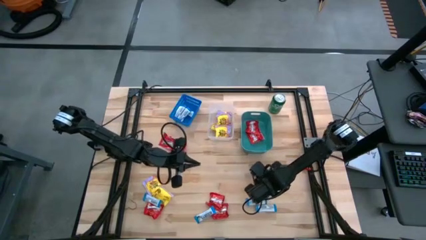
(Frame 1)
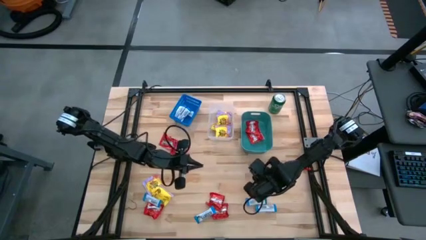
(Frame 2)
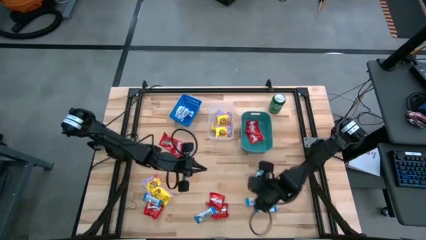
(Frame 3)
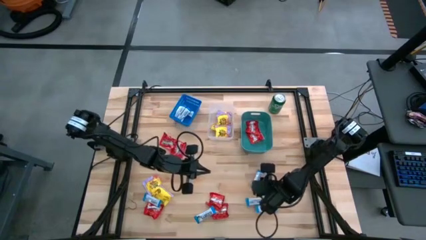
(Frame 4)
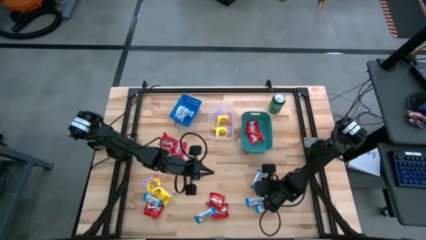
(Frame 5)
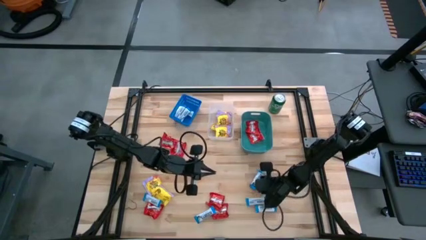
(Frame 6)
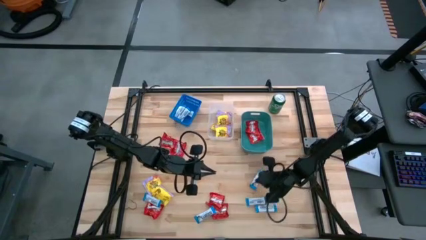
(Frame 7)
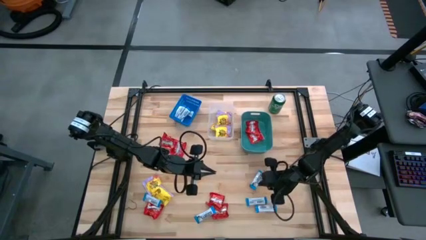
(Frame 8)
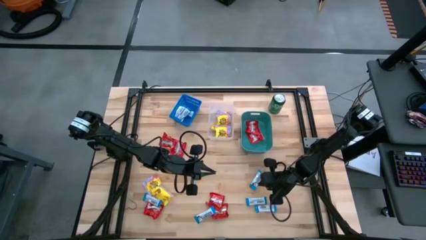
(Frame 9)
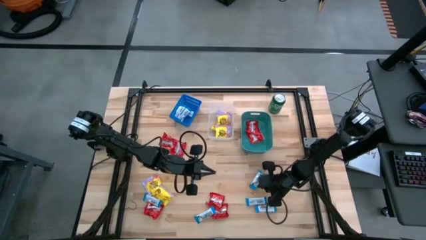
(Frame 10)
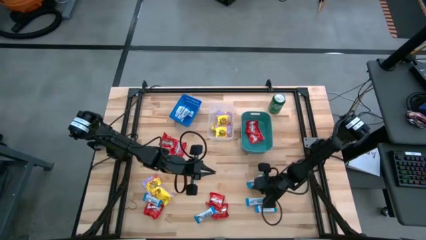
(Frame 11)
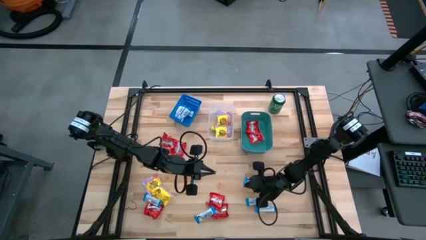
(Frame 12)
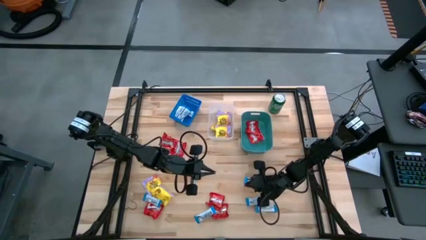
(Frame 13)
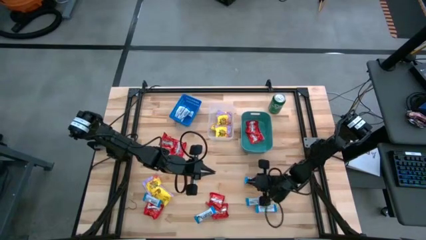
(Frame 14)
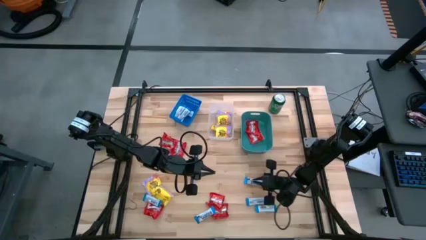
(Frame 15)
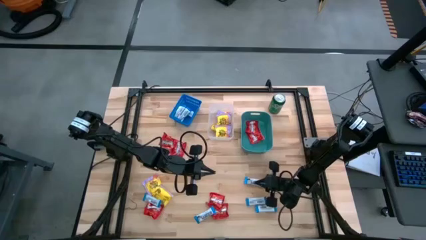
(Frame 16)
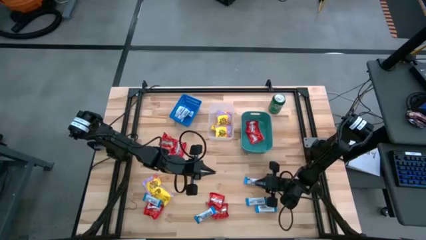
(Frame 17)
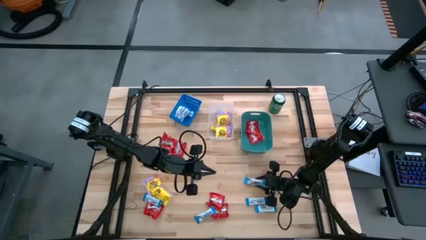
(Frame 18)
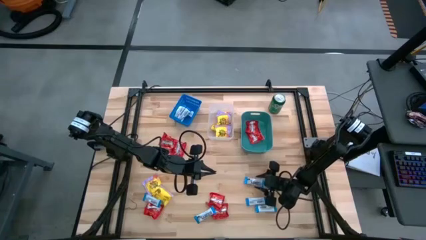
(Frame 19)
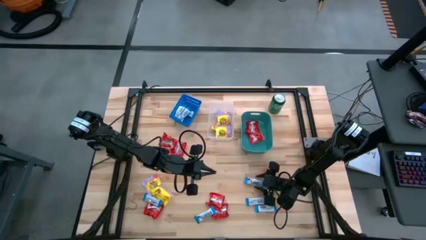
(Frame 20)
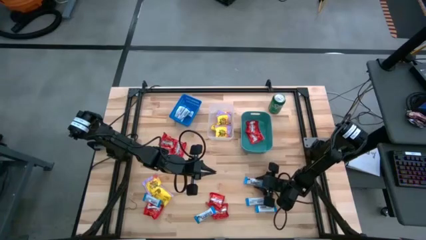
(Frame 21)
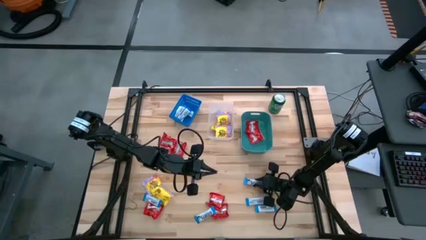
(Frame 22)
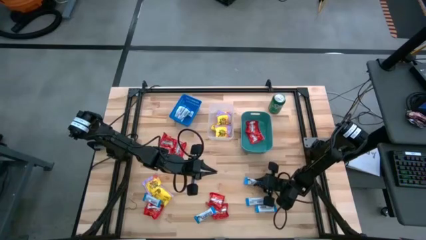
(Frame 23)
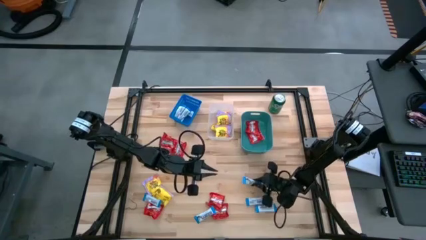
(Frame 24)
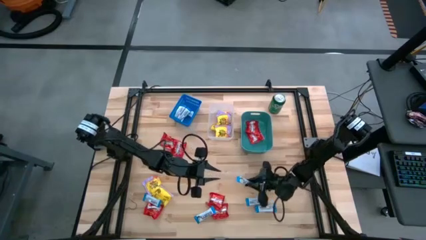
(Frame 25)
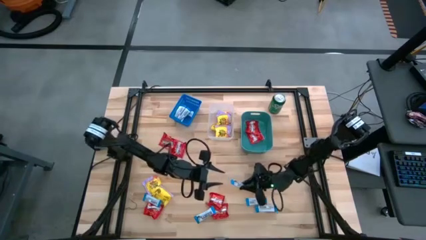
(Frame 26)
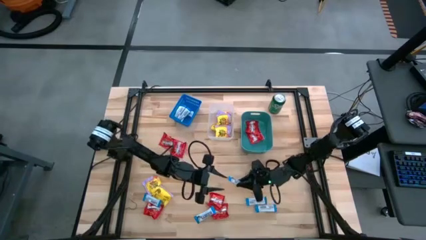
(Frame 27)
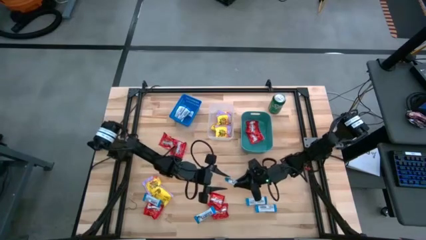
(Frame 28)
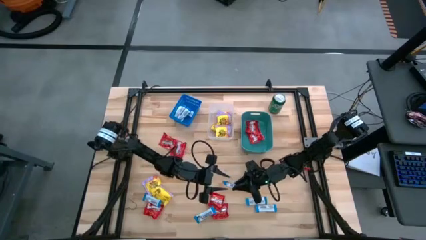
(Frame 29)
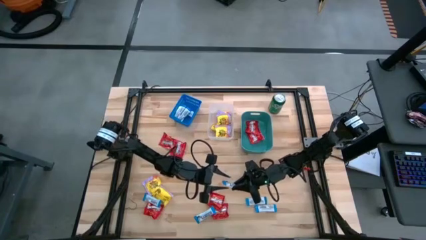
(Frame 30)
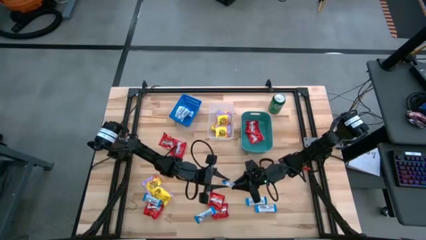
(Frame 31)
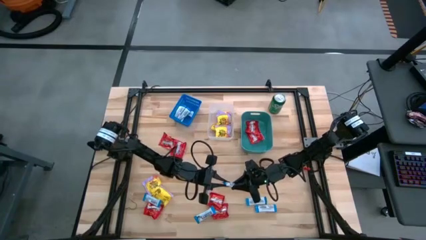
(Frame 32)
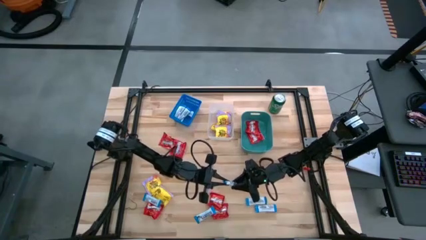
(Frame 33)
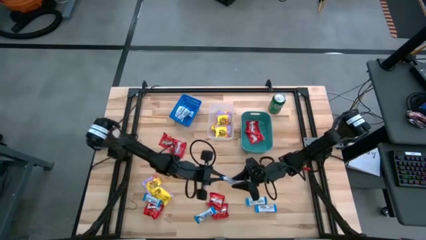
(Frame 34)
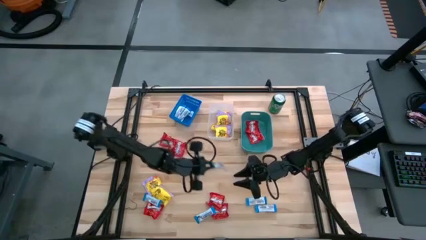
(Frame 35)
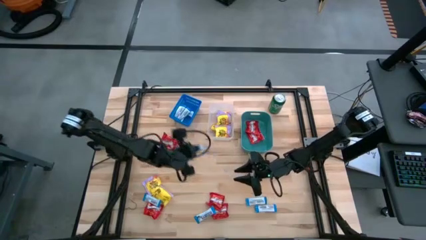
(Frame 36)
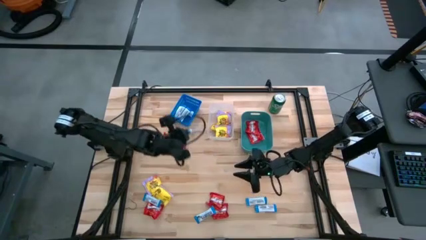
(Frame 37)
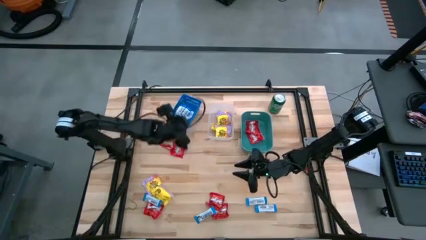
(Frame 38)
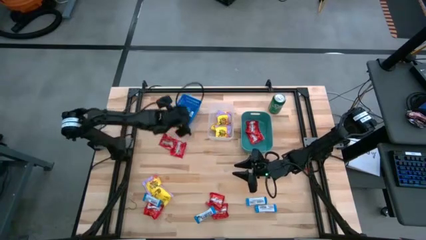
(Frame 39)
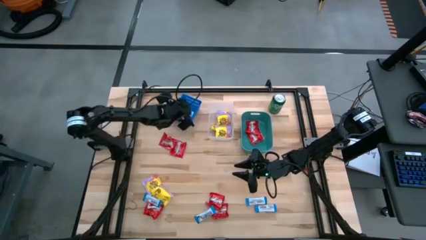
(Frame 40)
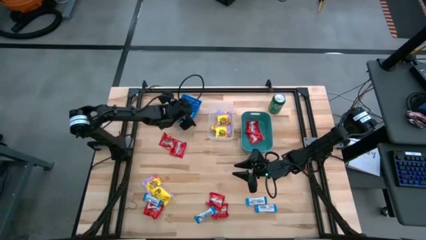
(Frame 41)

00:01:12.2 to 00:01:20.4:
Task: Sort candy
Put the white chocolate bar into the blue bin

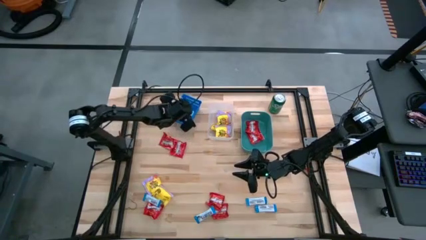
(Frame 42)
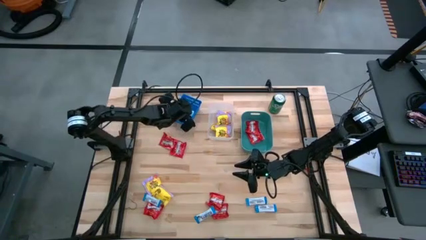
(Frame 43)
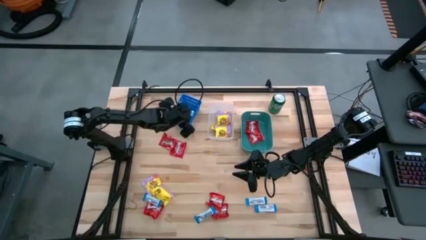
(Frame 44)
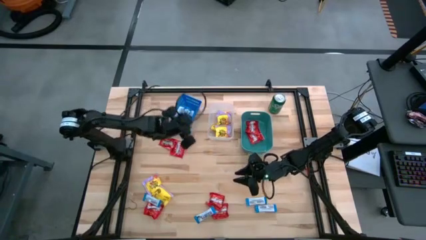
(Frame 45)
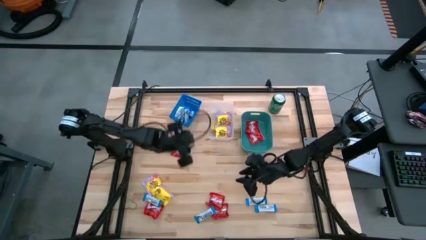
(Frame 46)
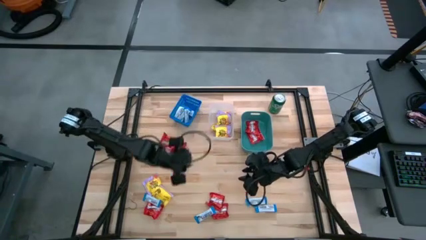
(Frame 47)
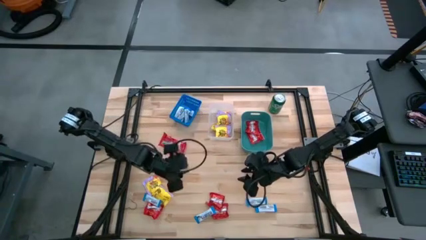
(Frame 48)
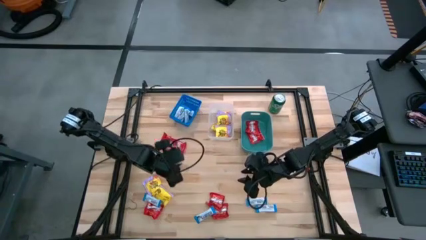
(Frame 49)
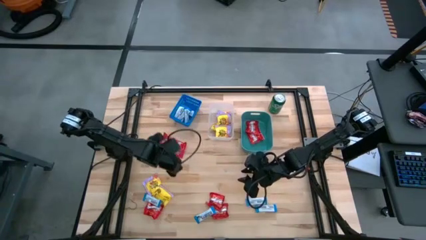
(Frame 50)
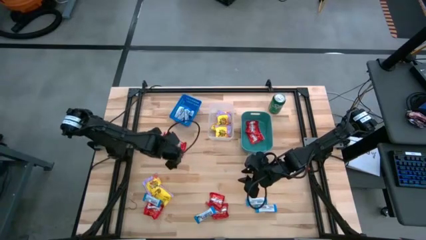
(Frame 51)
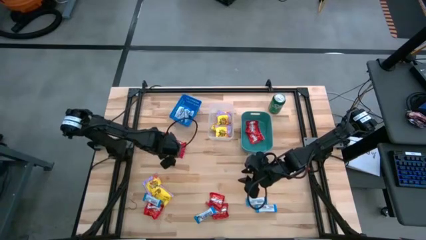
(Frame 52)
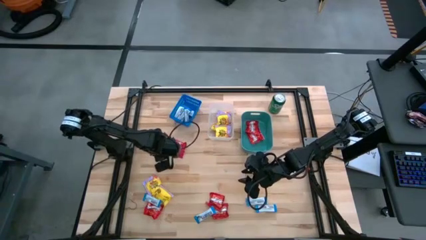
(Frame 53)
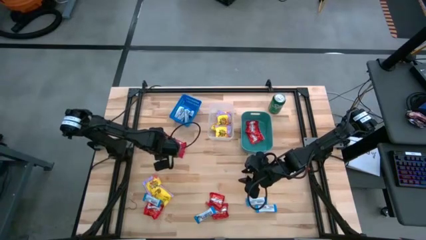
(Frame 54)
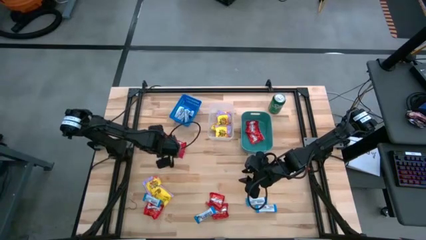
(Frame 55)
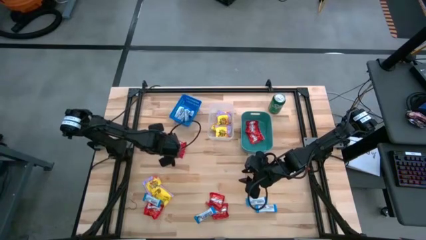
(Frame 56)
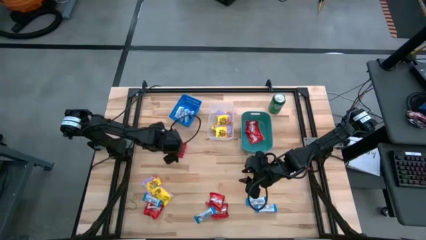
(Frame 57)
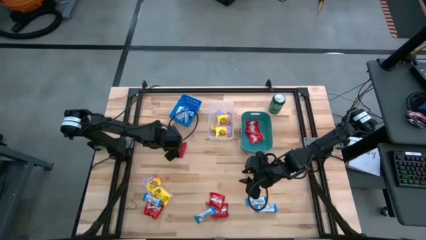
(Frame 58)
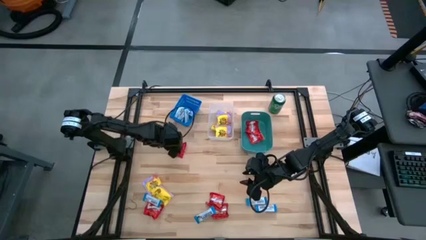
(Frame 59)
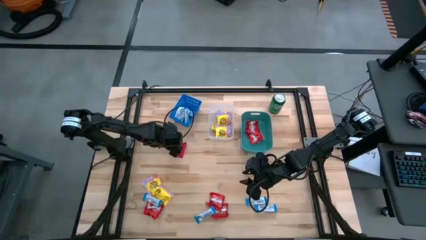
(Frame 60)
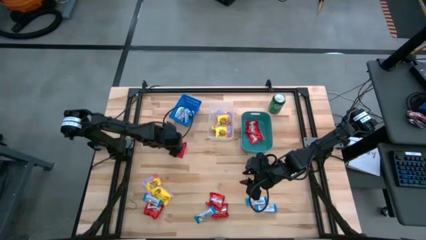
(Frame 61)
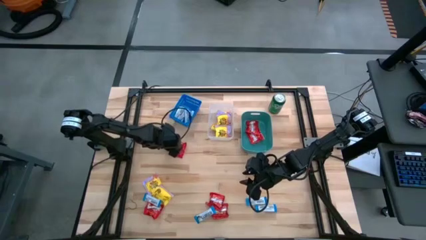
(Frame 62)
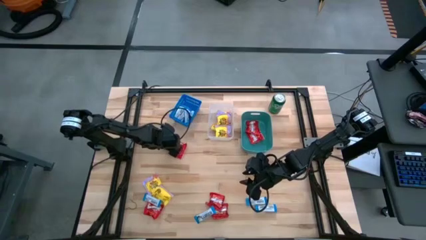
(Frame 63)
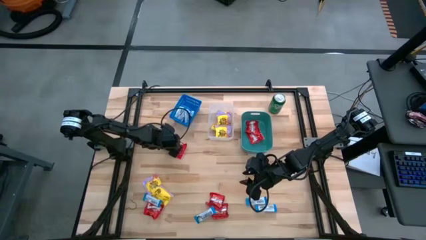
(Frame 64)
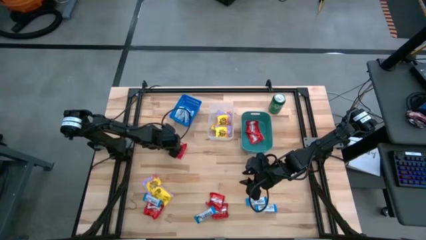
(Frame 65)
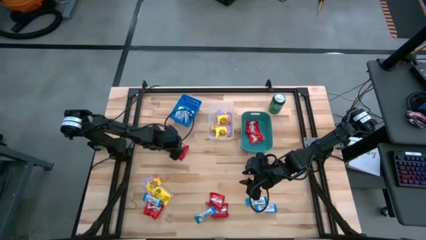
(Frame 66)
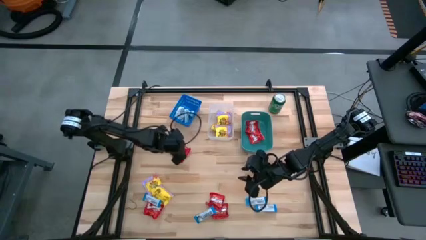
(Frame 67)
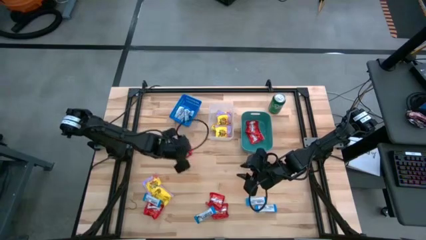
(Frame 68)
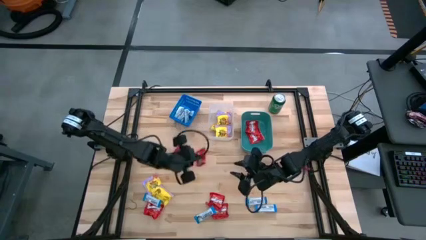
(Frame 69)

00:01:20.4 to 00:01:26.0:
Put the red candy into the green bin

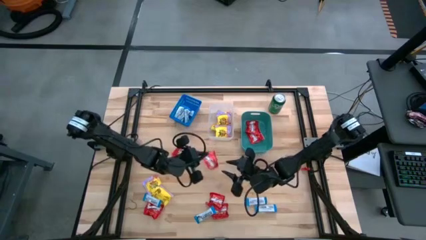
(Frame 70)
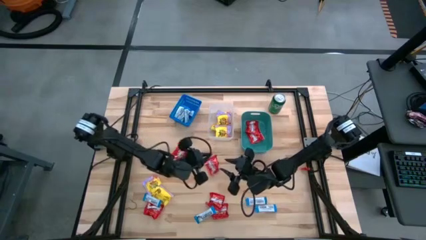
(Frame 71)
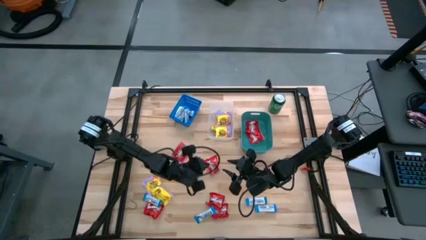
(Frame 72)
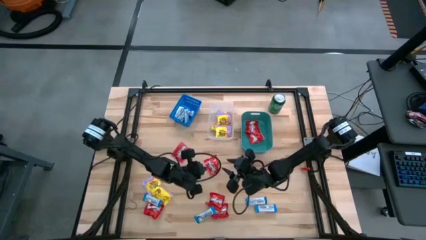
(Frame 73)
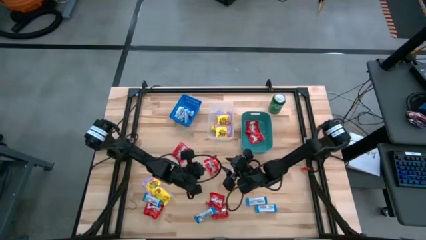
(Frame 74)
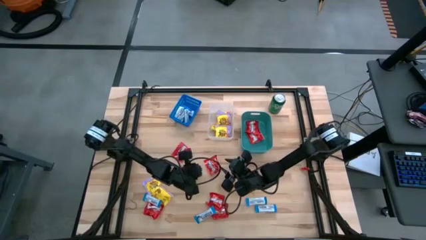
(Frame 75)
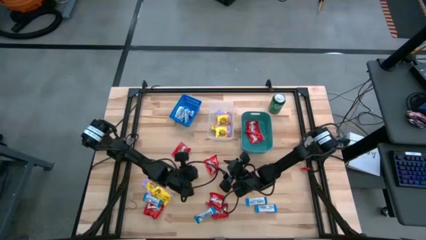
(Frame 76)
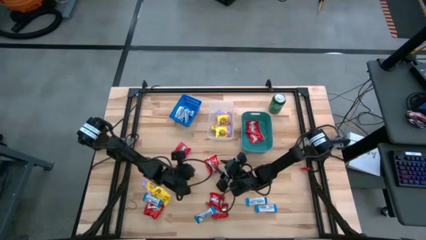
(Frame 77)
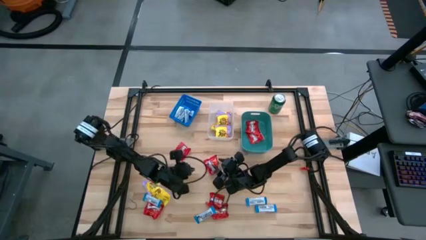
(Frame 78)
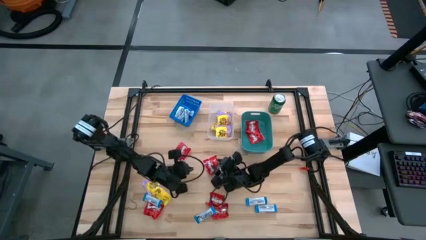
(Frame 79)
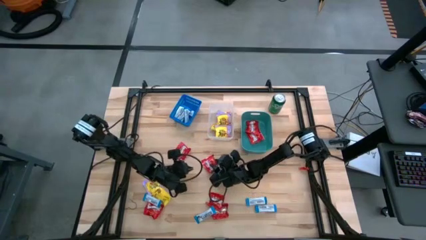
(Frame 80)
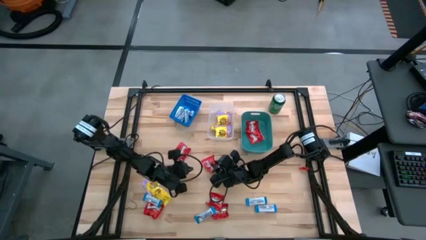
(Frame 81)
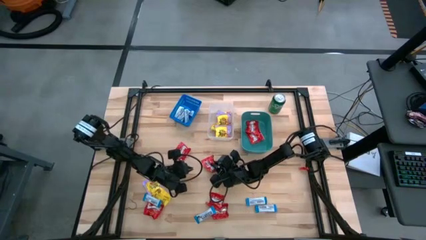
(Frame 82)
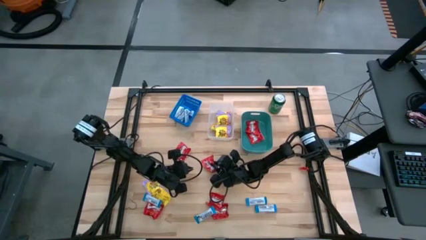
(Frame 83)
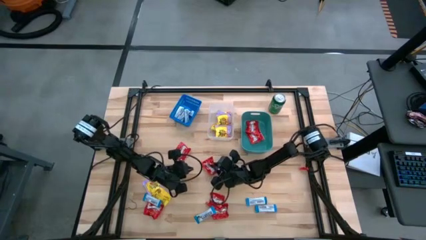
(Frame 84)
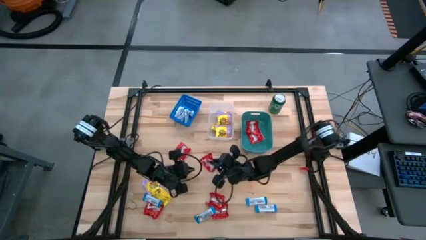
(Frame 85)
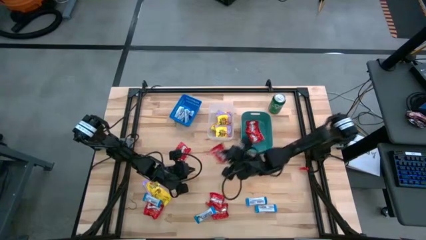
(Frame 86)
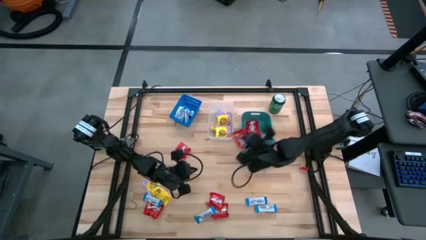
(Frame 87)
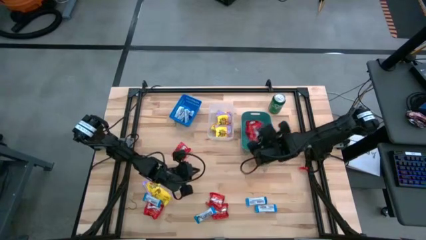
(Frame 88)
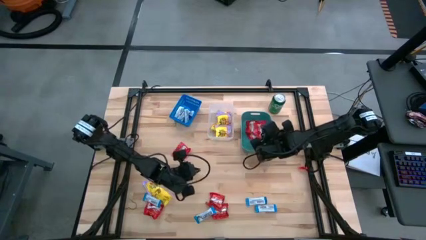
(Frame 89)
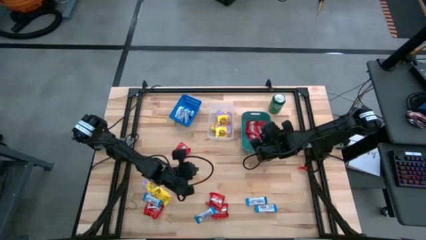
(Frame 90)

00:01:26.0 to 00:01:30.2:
Put the yellow candy into the transparent bin
